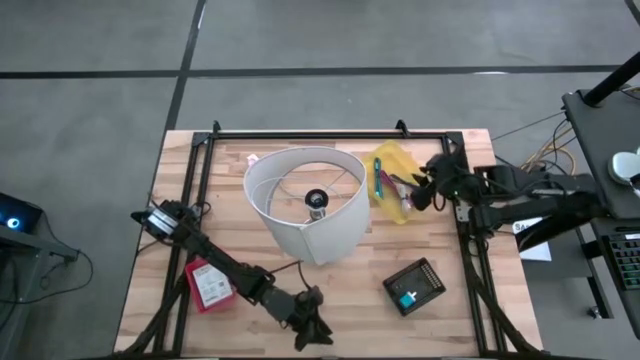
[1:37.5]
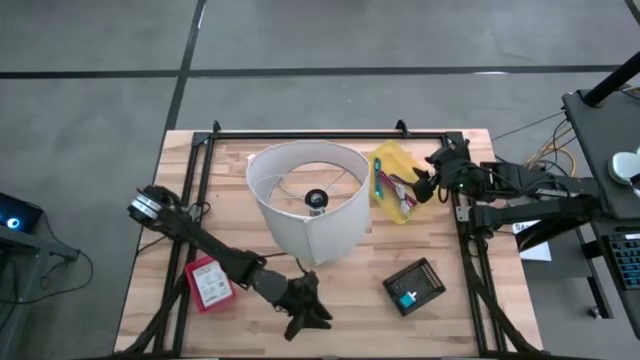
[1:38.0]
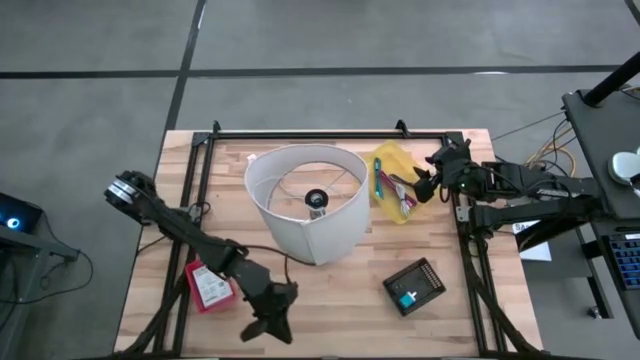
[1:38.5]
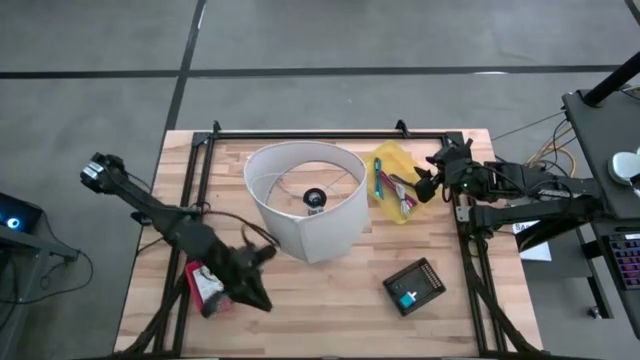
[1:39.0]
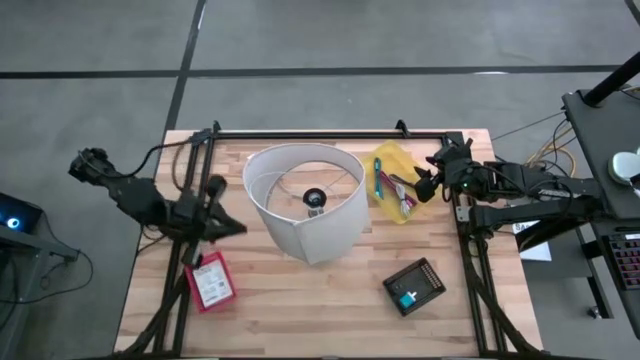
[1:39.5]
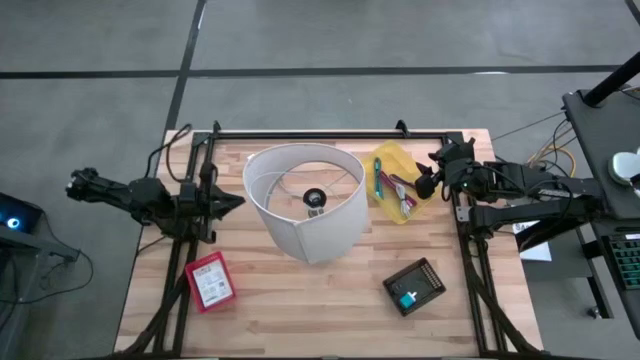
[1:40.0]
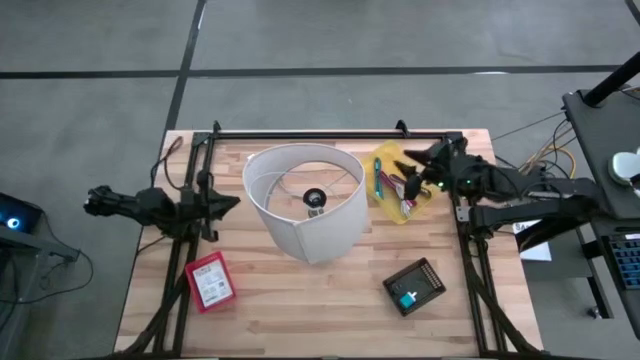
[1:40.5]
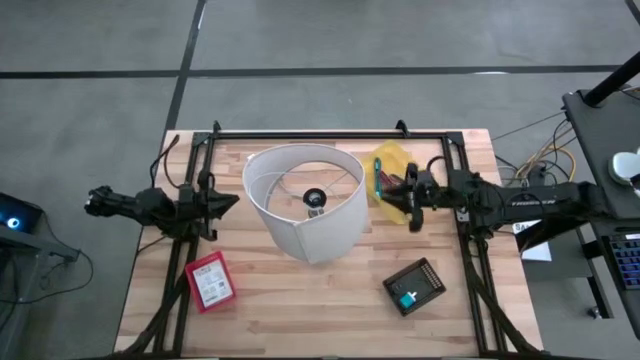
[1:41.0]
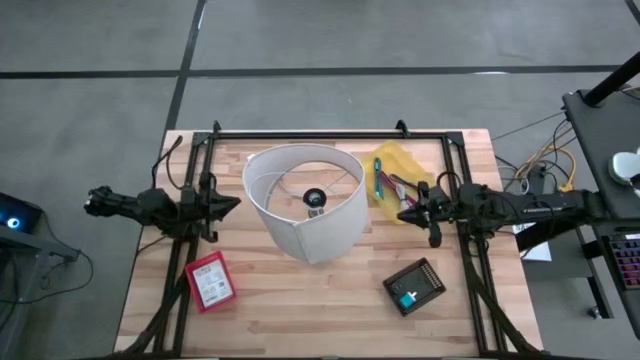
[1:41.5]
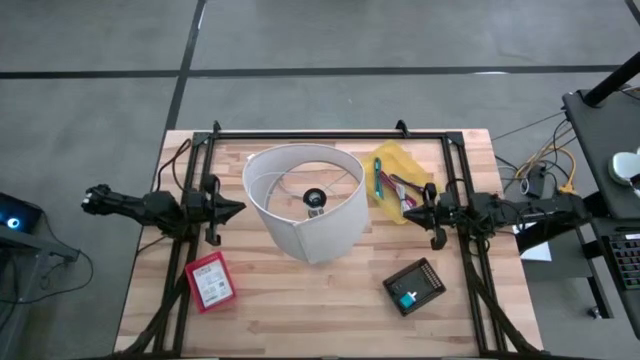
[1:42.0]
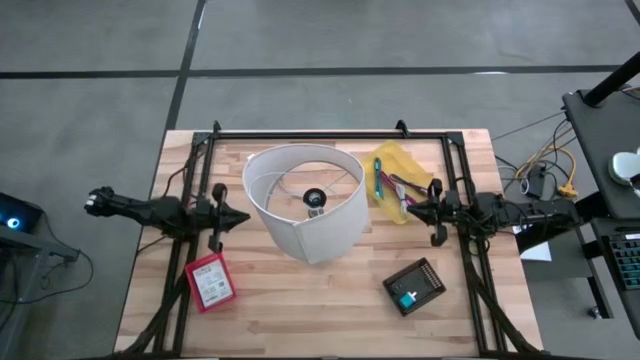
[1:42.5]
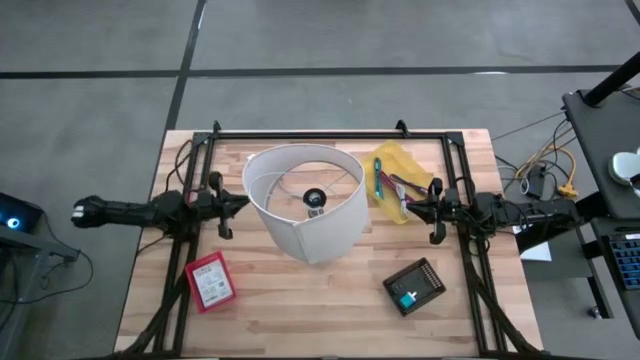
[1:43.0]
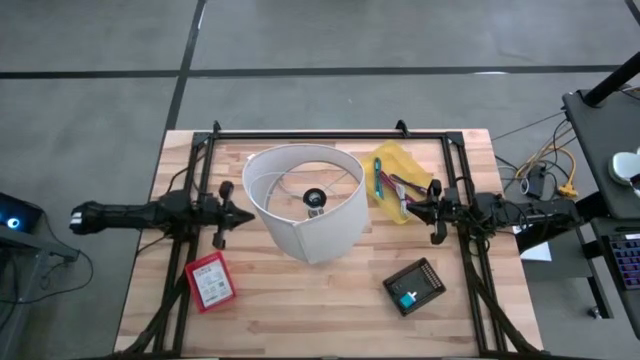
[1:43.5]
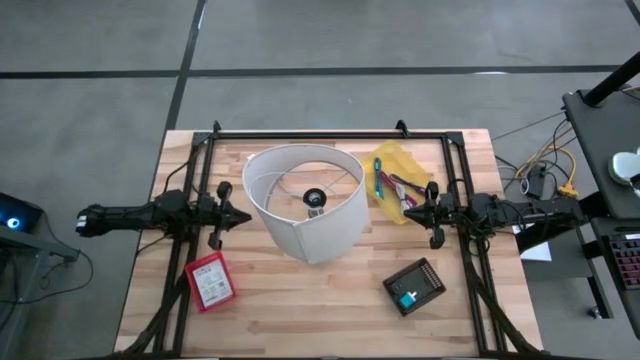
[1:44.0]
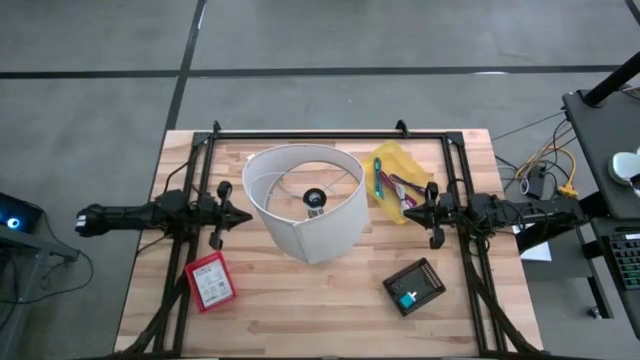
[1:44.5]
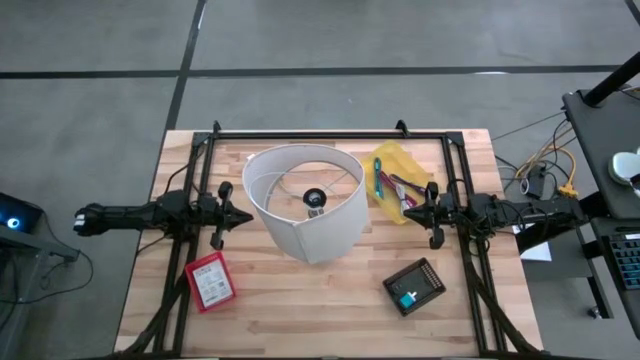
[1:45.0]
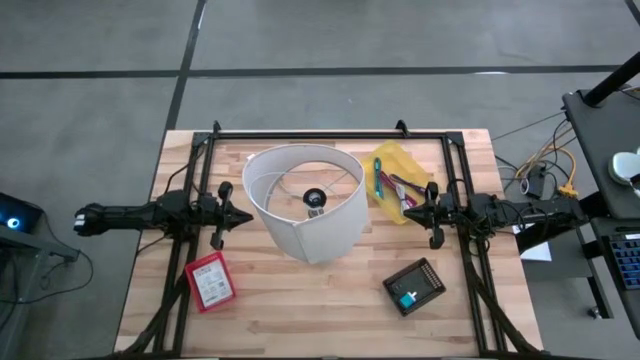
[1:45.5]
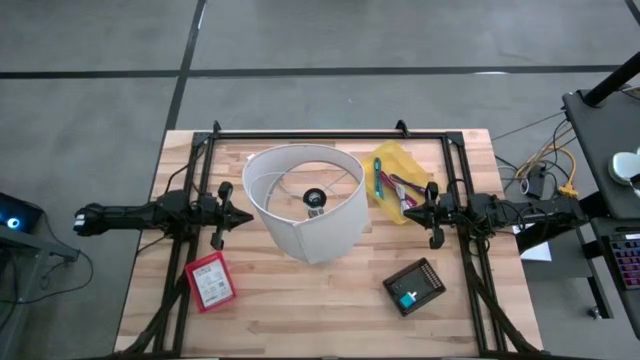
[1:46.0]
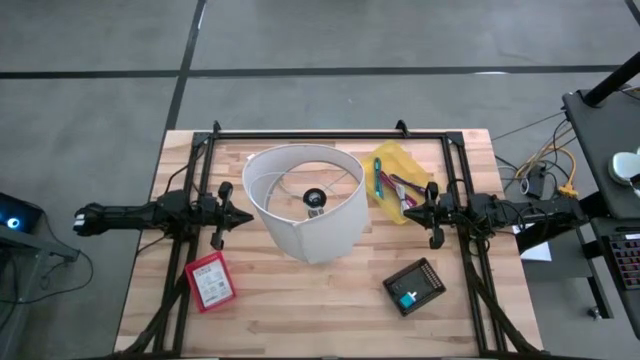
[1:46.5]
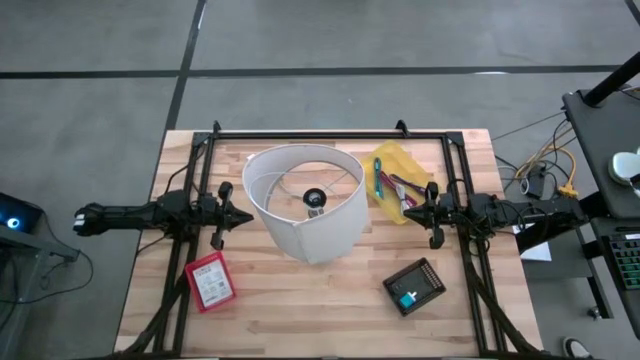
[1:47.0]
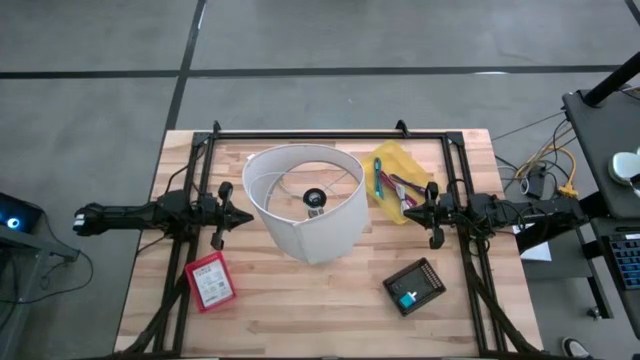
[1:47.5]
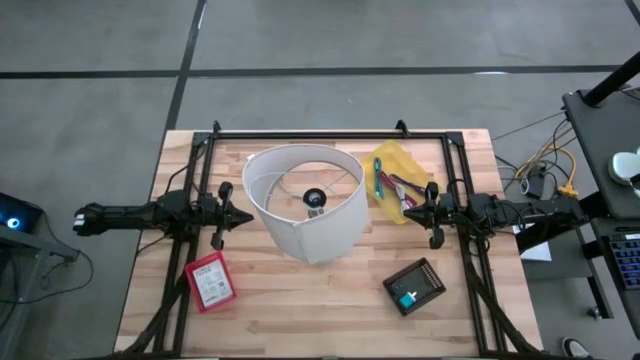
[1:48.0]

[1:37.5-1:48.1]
Task: Pick and place items into bin
Return to Home Position

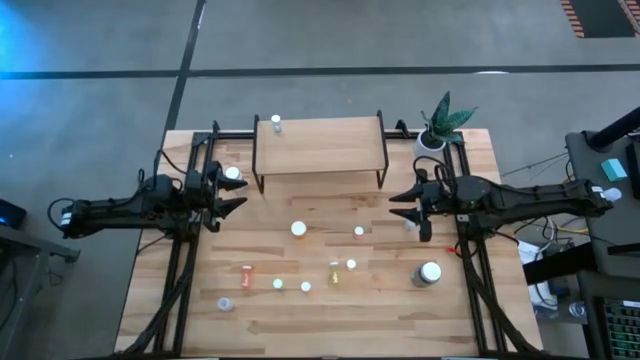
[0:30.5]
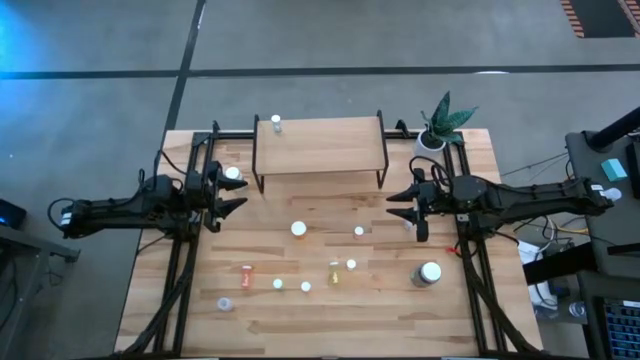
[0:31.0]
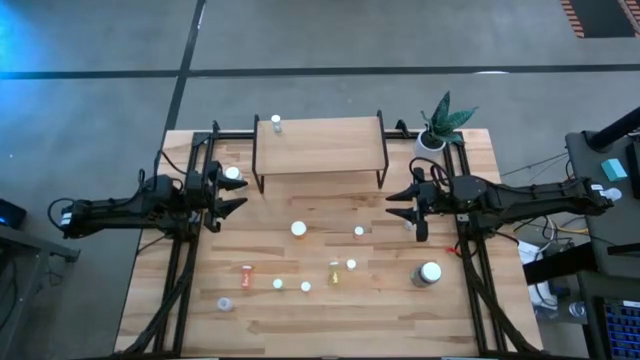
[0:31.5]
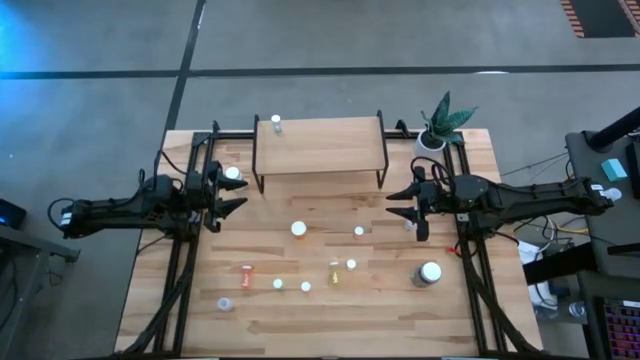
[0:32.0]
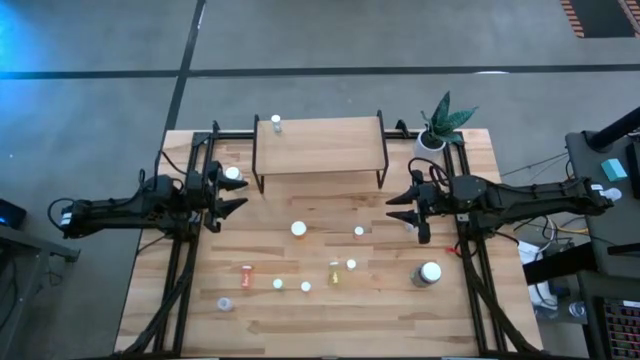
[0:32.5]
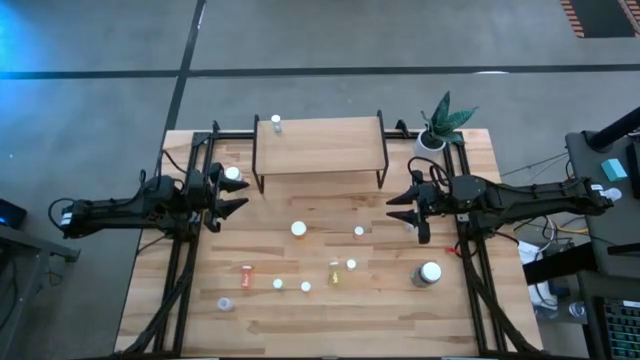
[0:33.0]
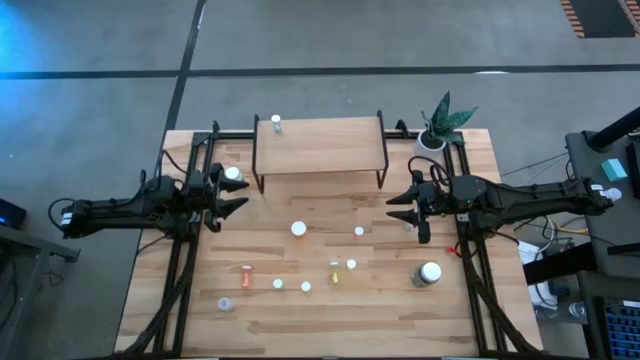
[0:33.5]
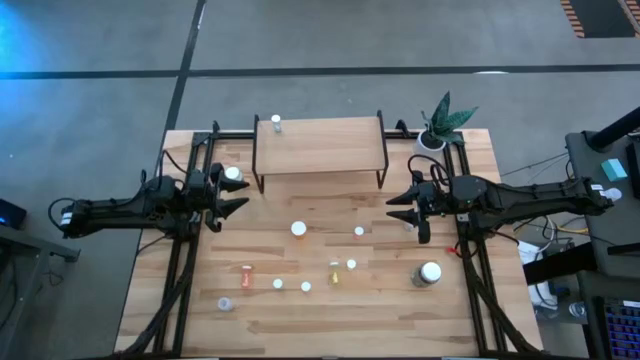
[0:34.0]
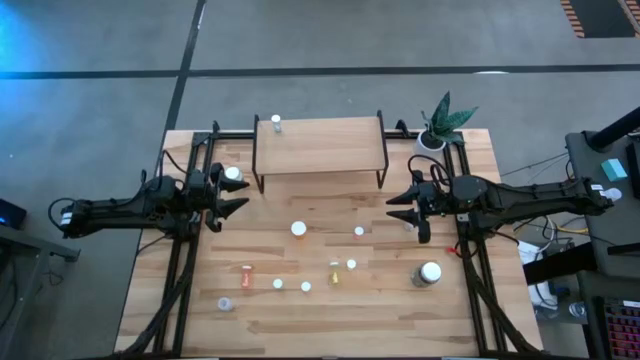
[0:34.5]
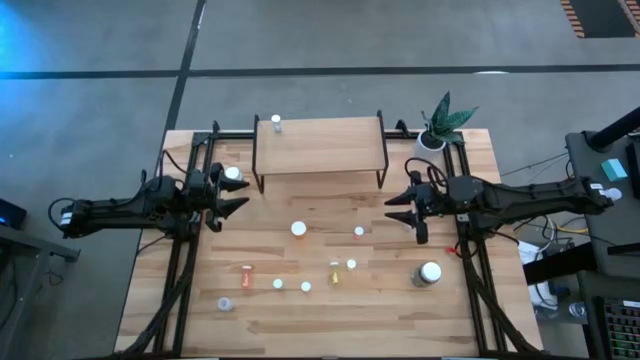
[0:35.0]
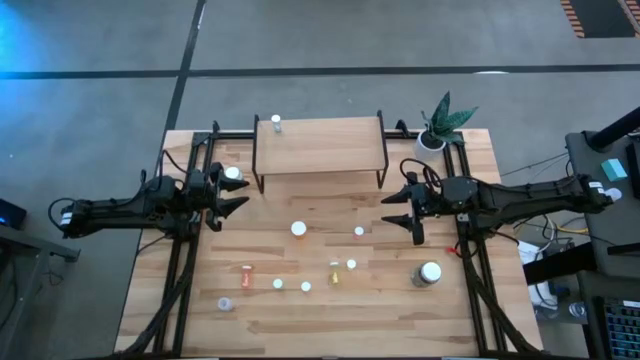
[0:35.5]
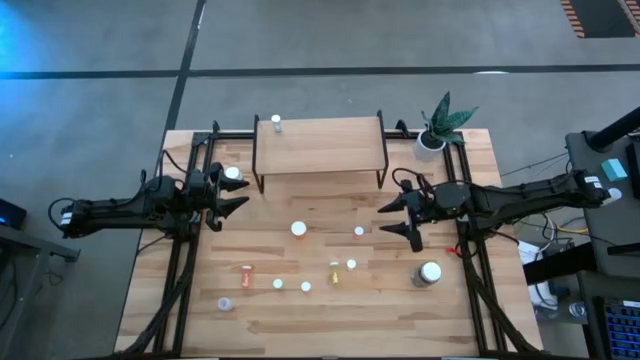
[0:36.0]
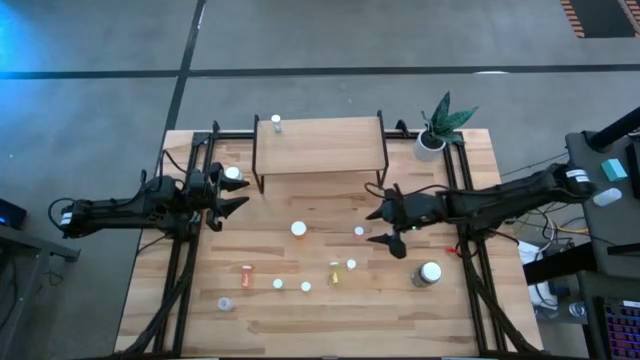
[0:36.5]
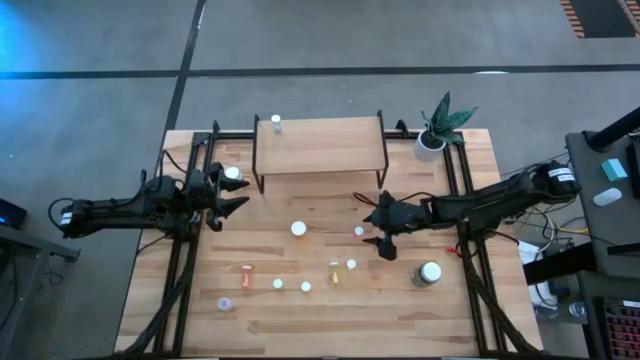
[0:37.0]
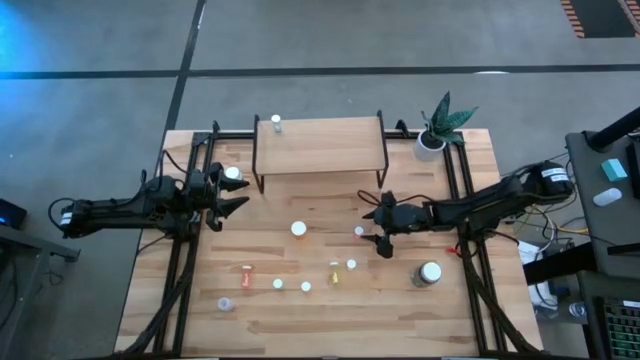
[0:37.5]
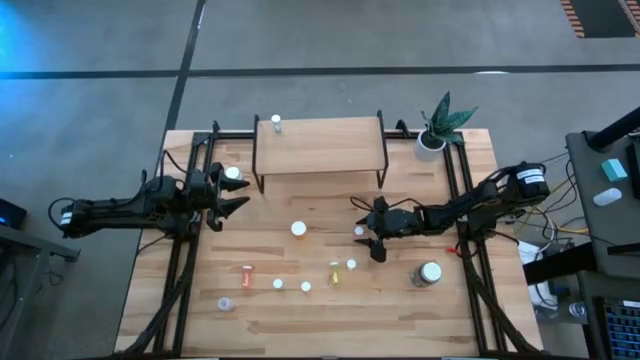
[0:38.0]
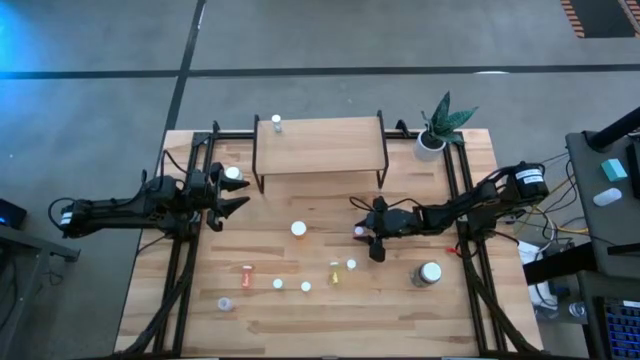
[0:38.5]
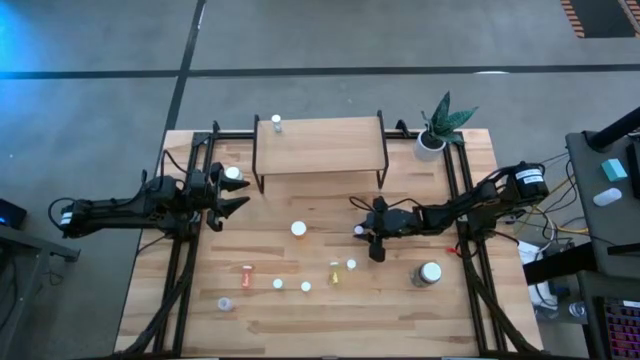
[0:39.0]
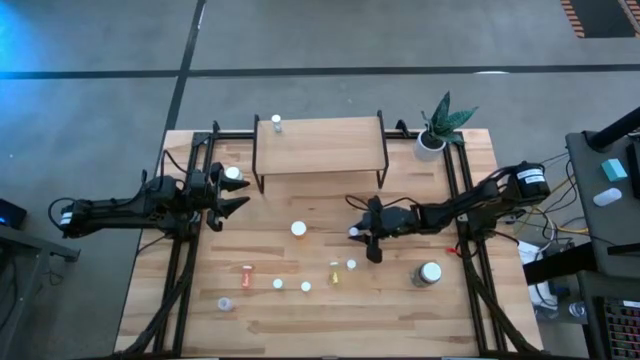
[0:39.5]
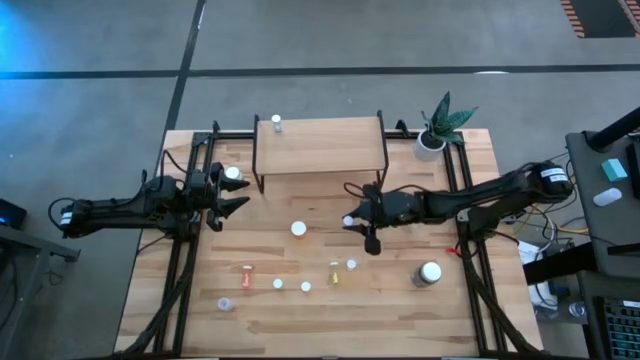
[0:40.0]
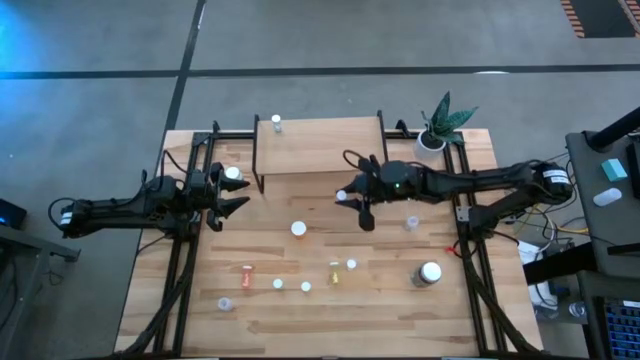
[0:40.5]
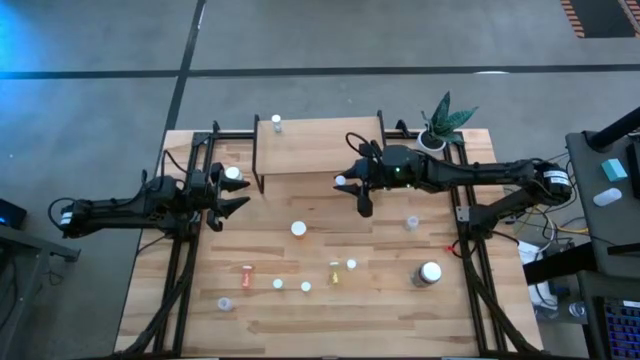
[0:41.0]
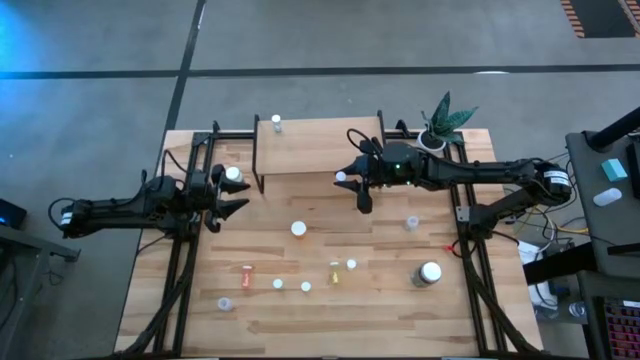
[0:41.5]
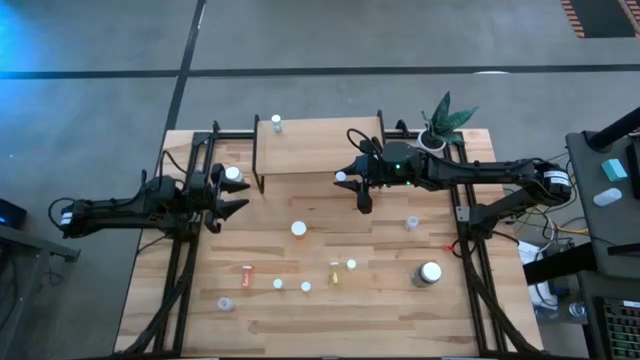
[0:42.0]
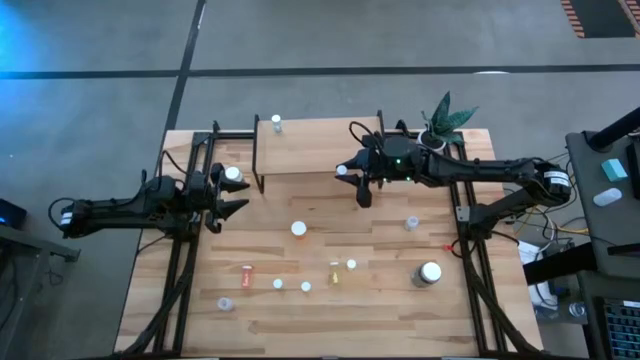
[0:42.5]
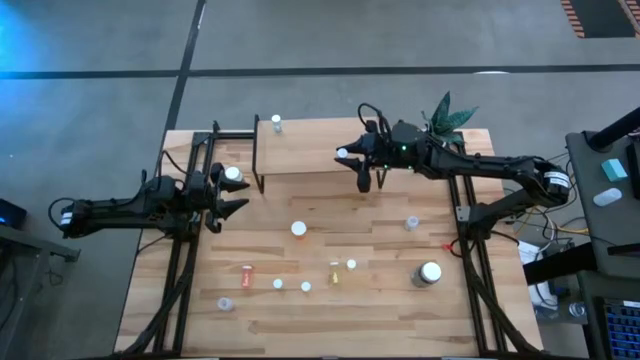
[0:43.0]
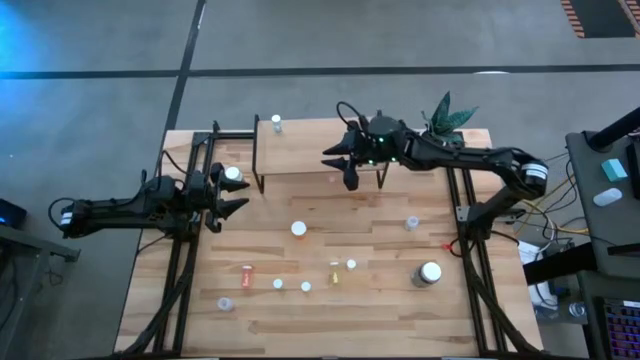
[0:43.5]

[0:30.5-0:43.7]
Task: Pick and place medicine bottles onto shelf by color
Put the right pink medicine bottle on the shelf
